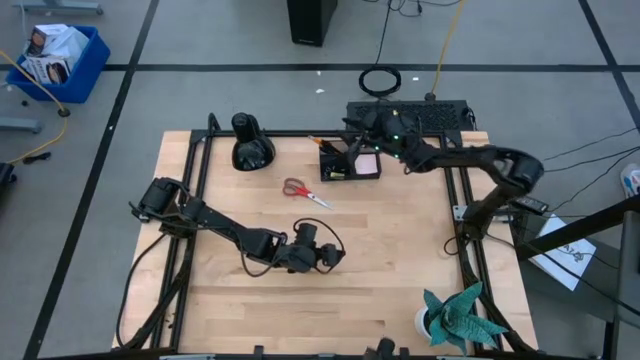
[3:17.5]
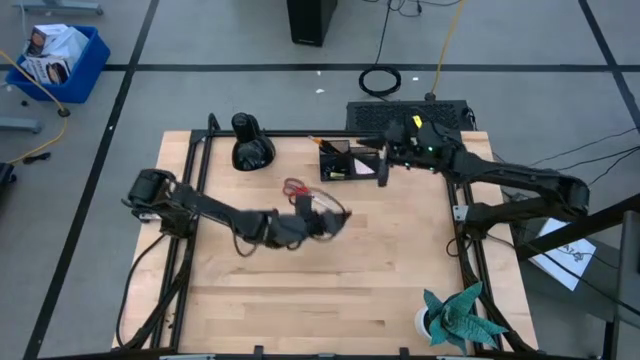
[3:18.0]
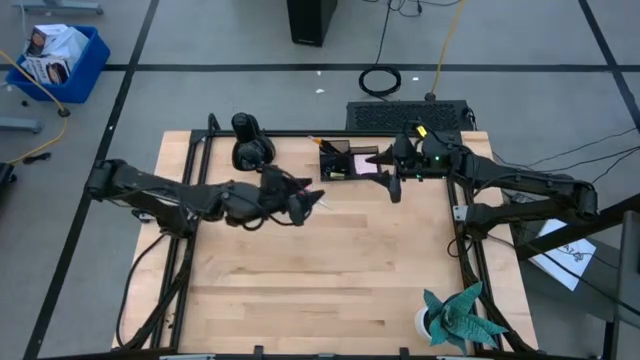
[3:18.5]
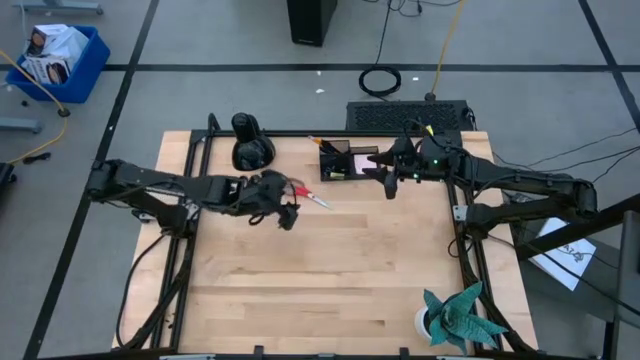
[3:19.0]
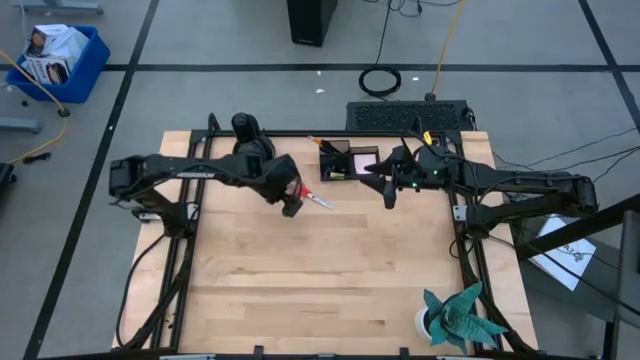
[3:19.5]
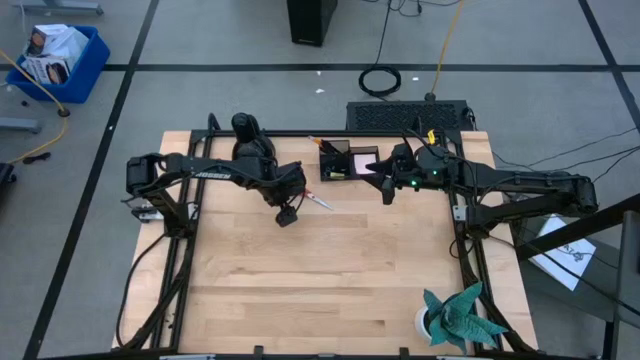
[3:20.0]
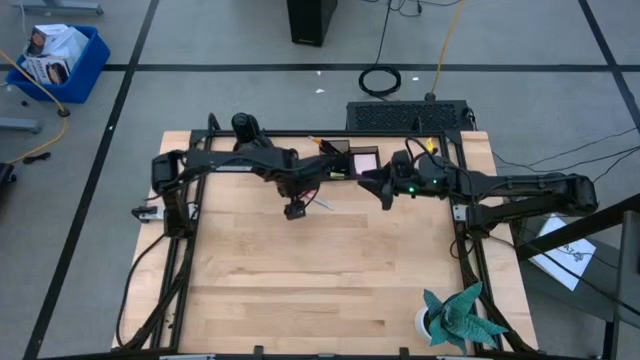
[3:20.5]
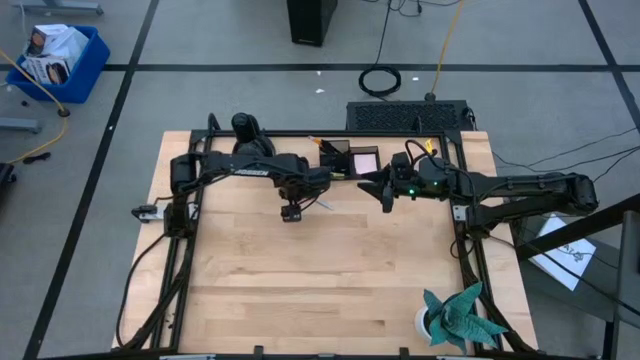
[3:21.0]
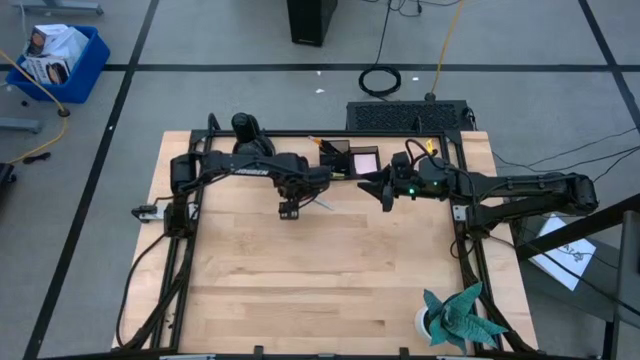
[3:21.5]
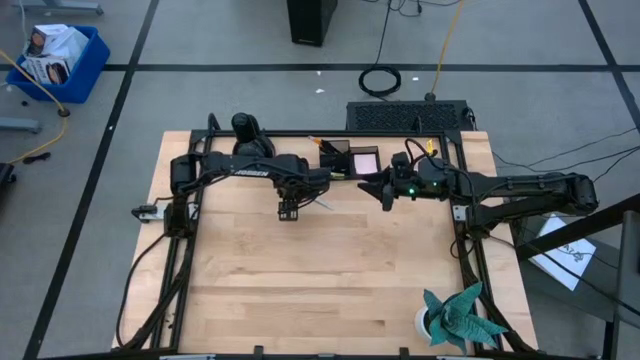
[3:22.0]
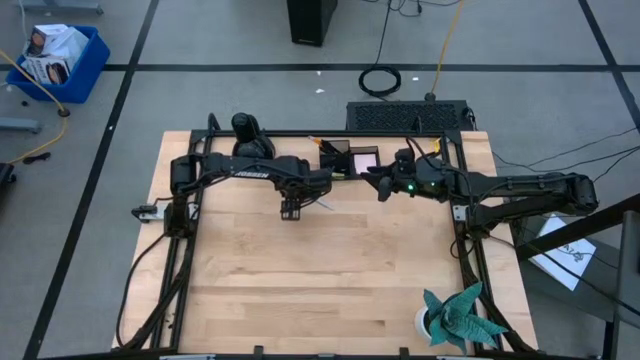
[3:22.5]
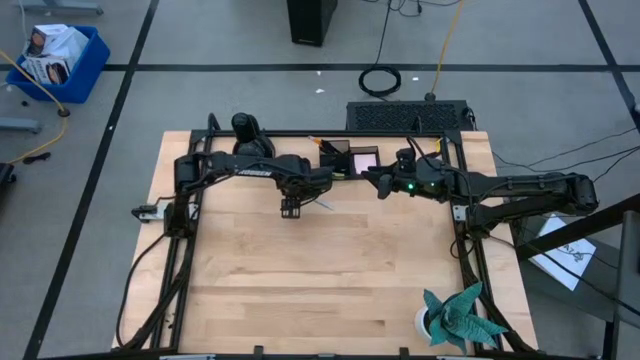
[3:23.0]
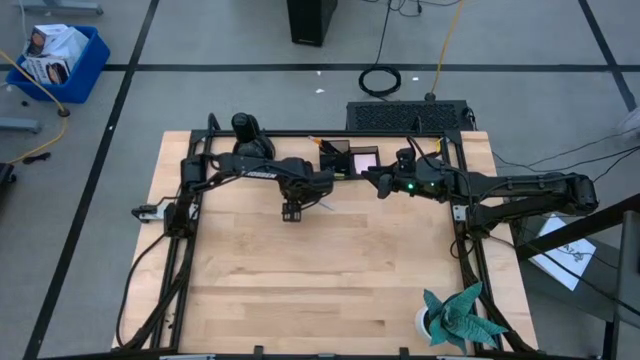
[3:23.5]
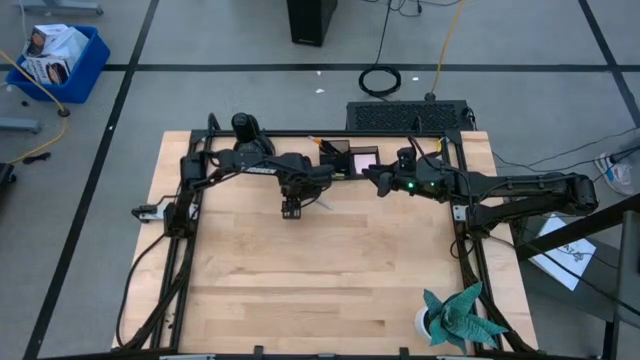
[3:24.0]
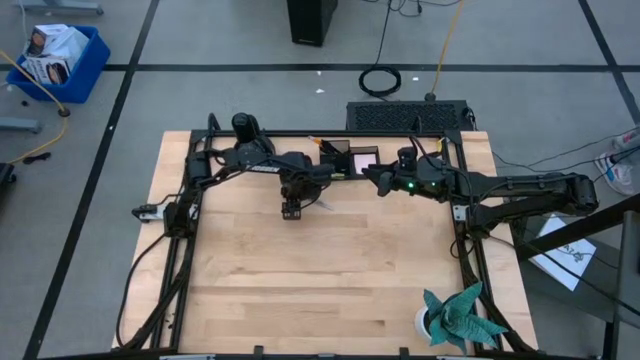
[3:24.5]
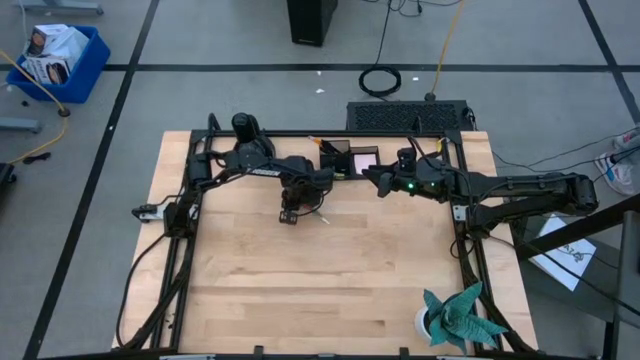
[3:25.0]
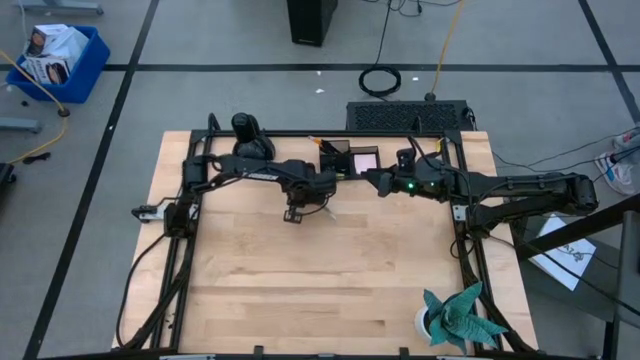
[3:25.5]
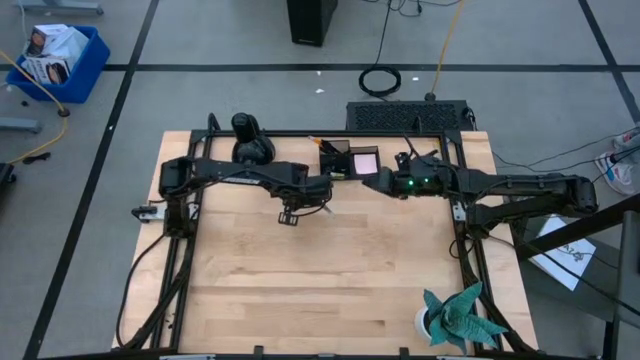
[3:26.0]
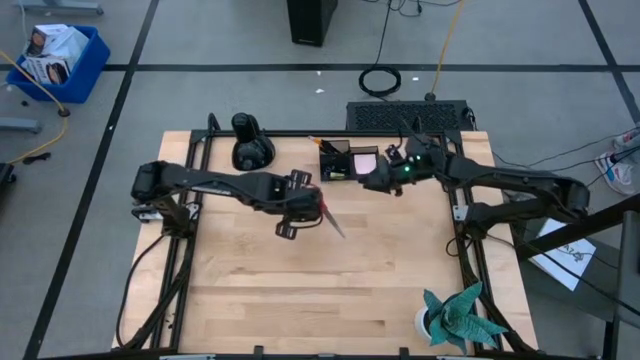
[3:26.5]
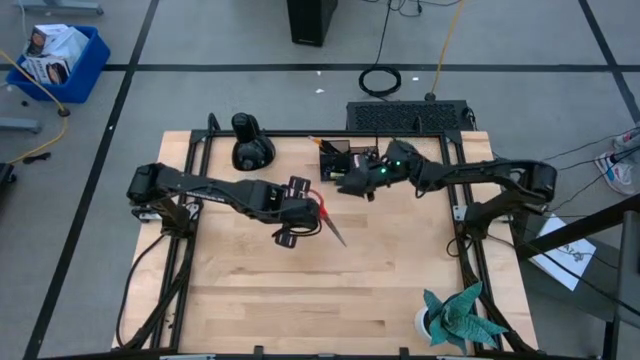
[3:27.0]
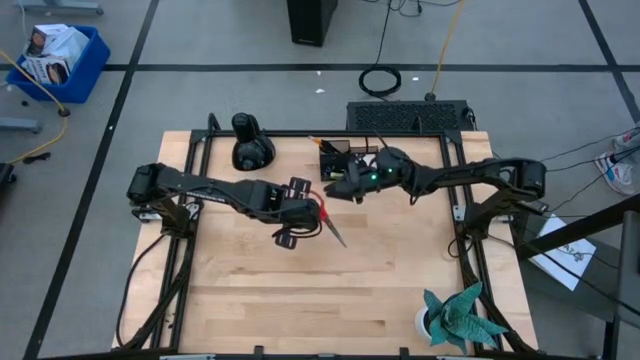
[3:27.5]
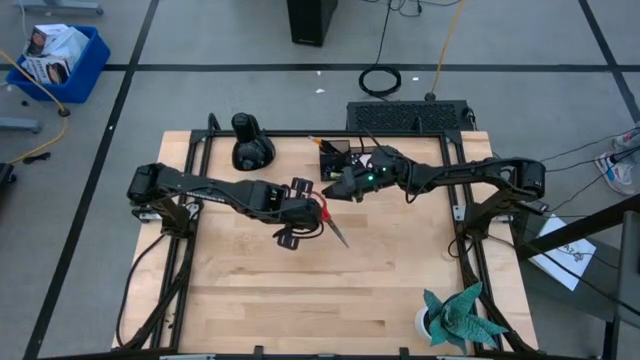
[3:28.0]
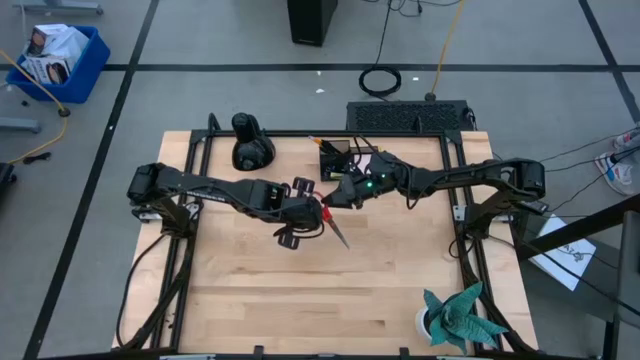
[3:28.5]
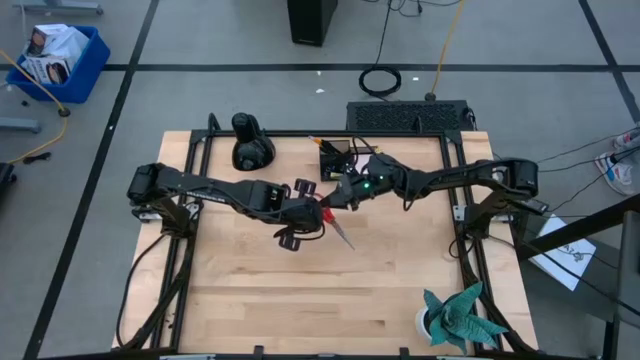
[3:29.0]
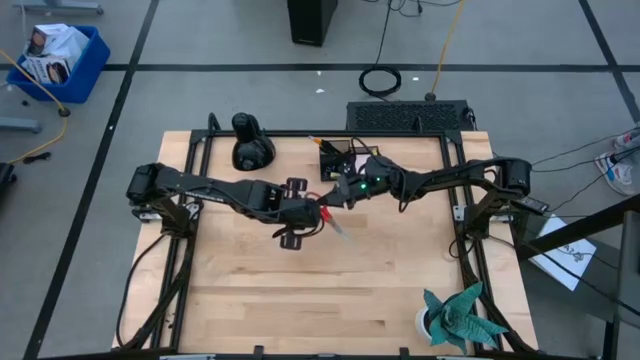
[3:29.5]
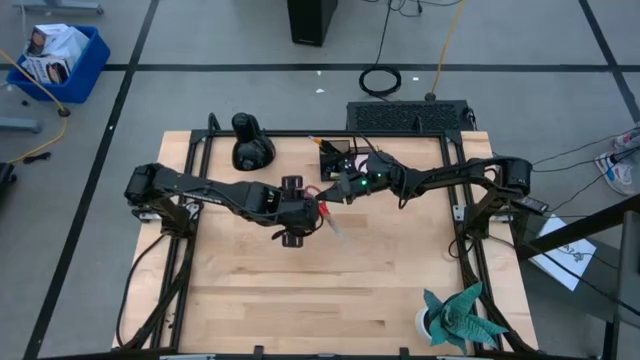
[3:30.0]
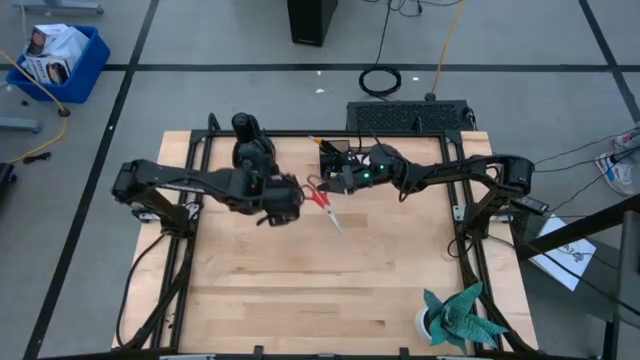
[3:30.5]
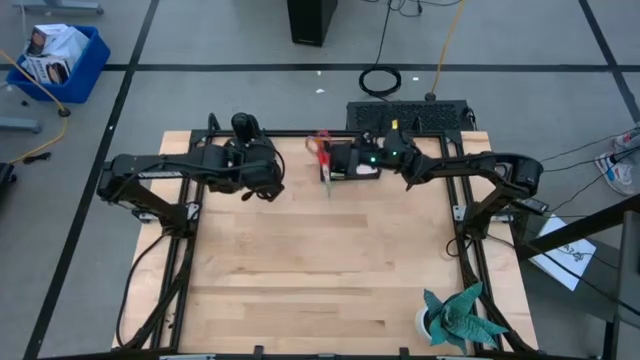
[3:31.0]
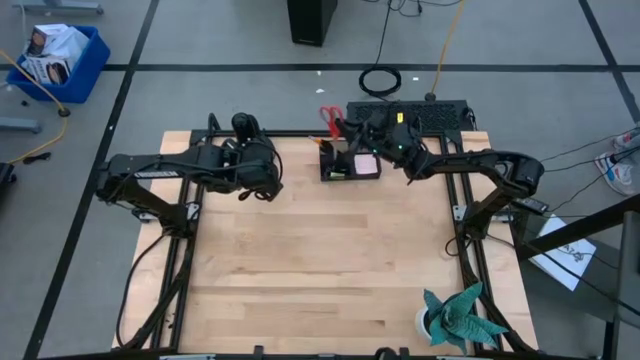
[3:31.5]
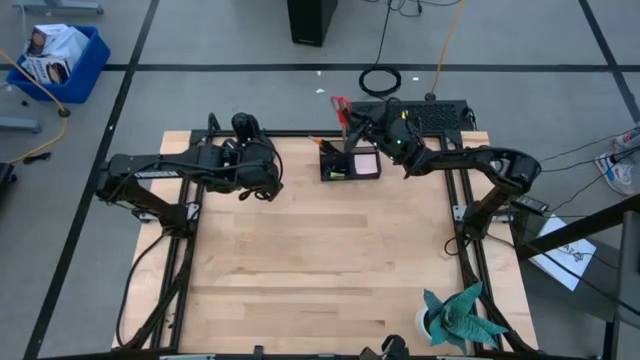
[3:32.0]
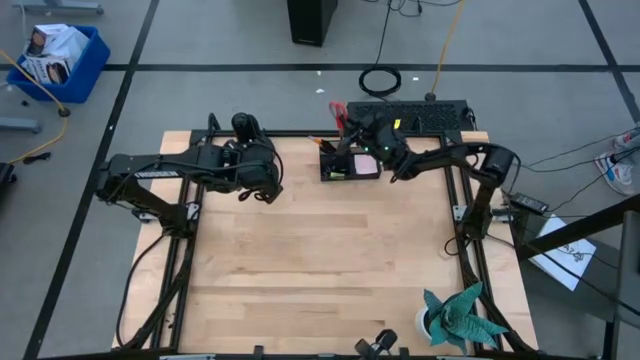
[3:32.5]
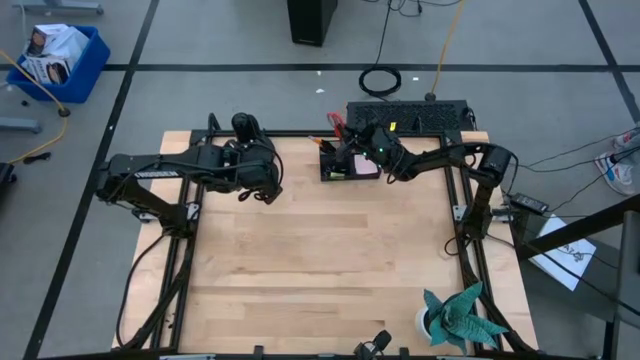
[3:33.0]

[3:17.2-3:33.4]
Task: Pick and place office supplies into organizer
Put the red scissors into the black desk organizer

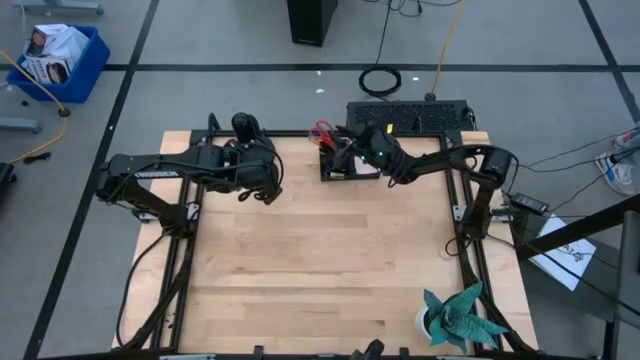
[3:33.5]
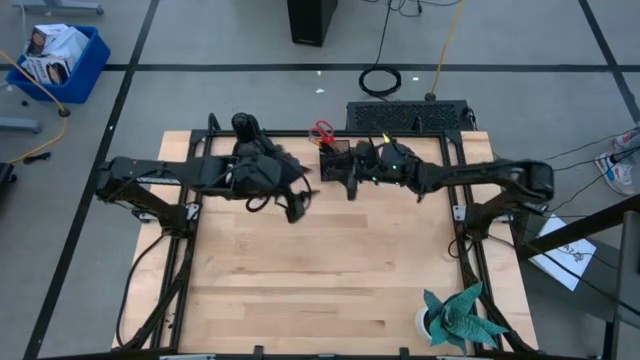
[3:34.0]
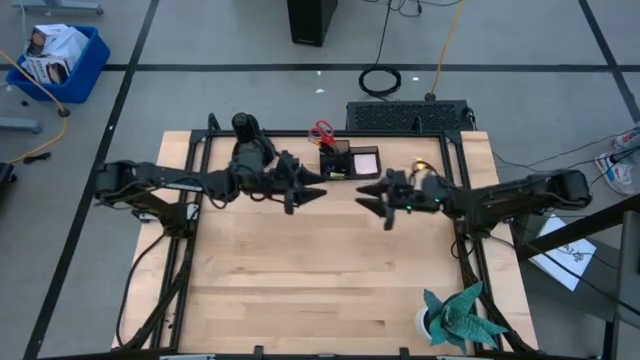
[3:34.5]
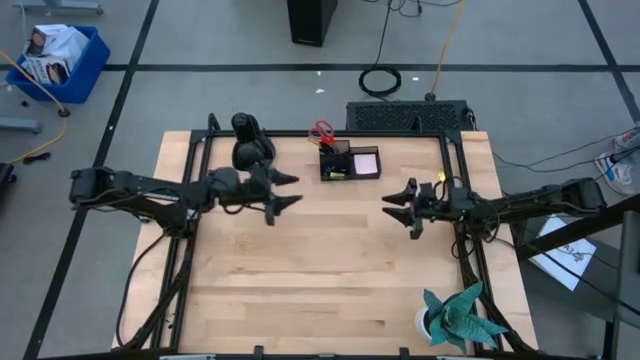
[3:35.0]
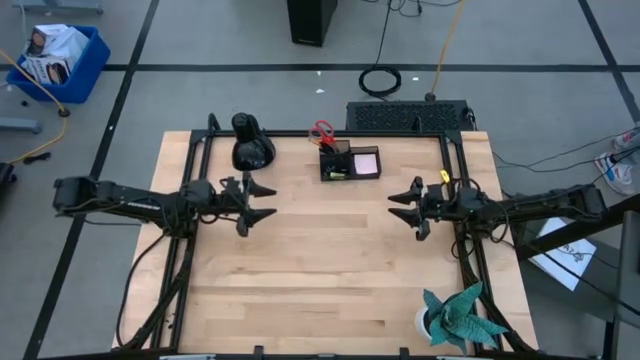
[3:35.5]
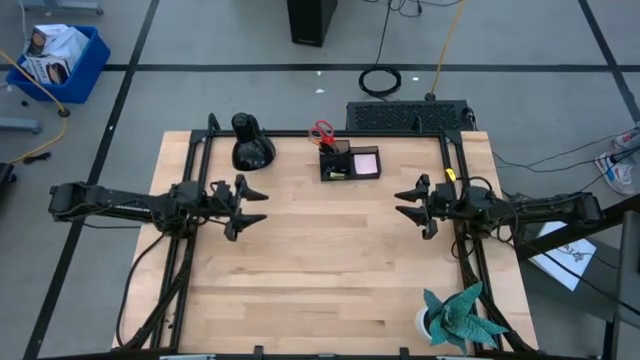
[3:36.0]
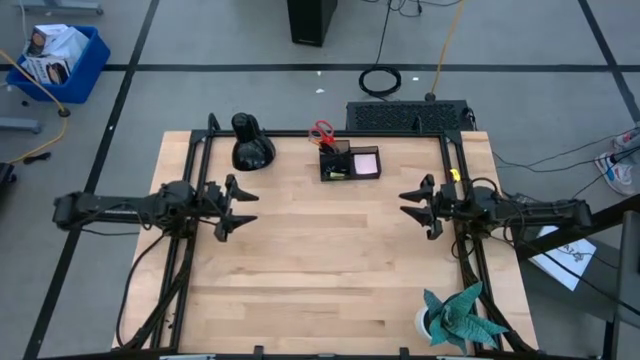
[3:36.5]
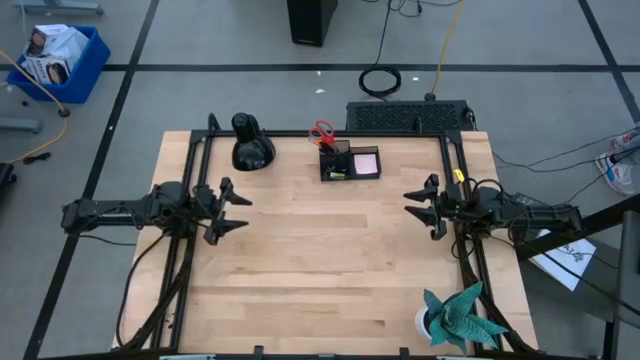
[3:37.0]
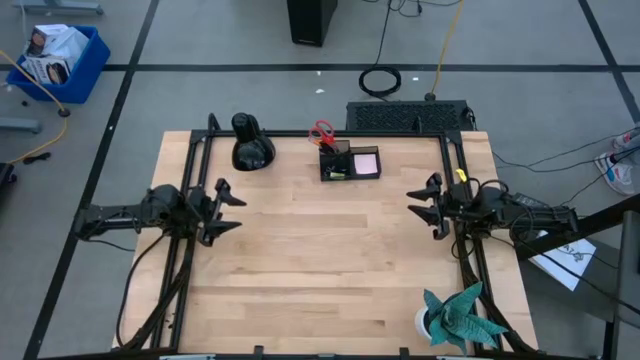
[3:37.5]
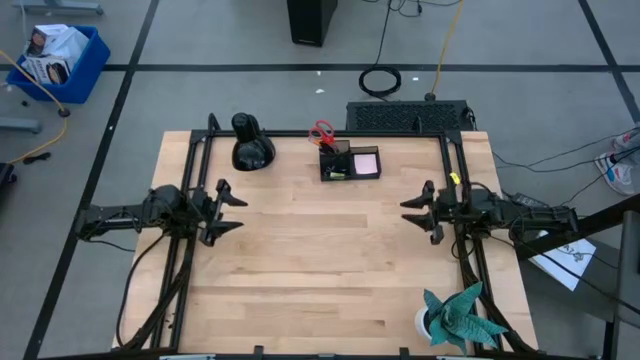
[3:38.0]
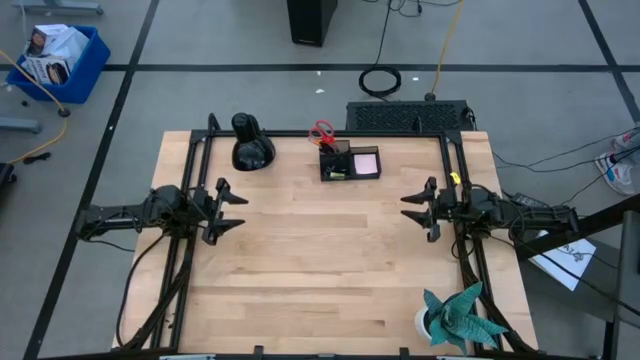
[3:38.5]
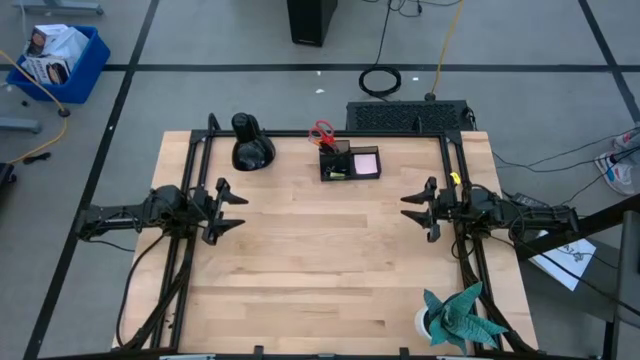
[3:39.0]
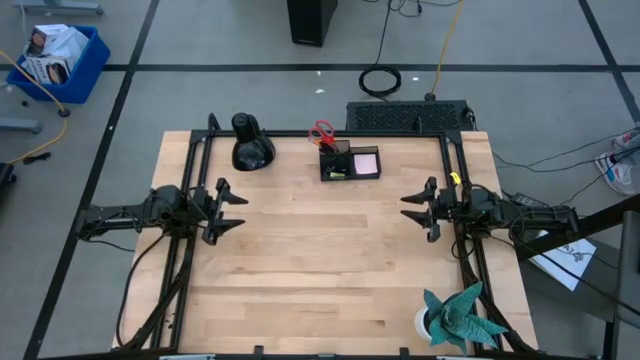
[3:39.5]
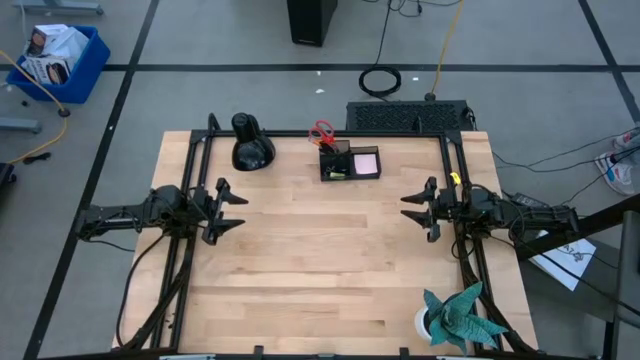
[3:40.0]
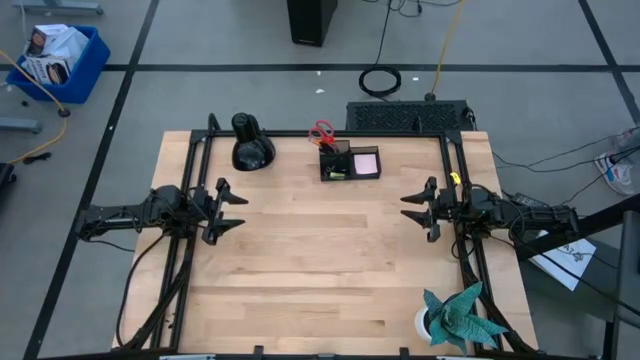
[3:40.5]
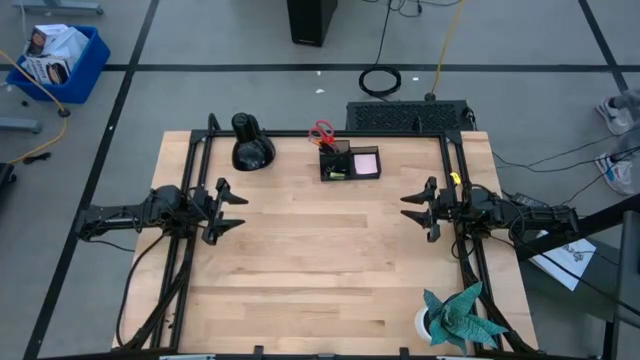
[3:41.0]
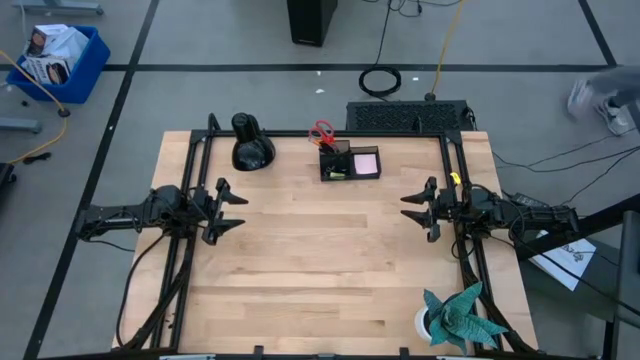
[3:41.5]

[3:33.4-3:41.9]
Return to Home Position
